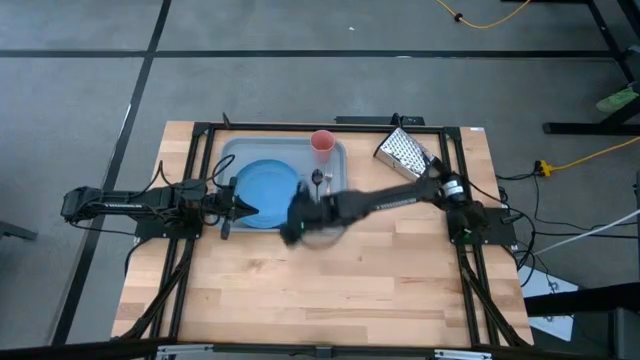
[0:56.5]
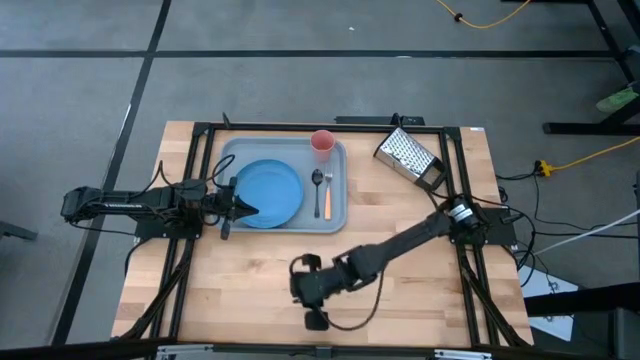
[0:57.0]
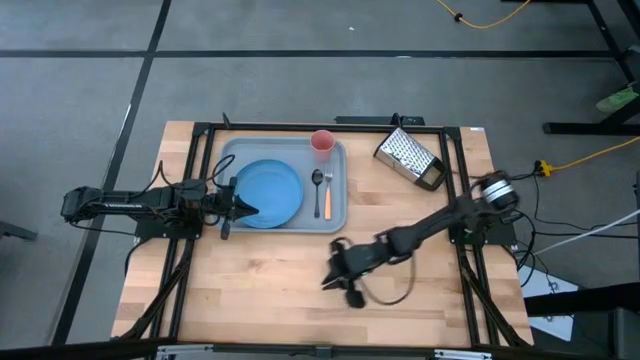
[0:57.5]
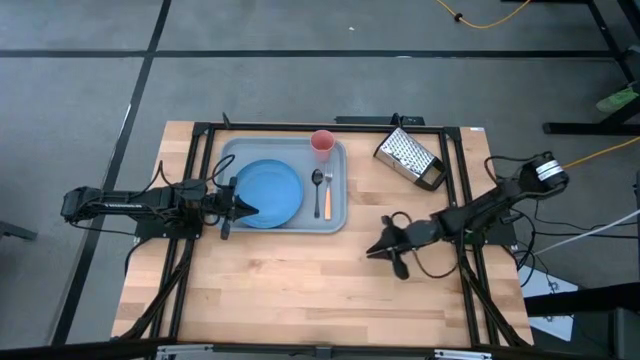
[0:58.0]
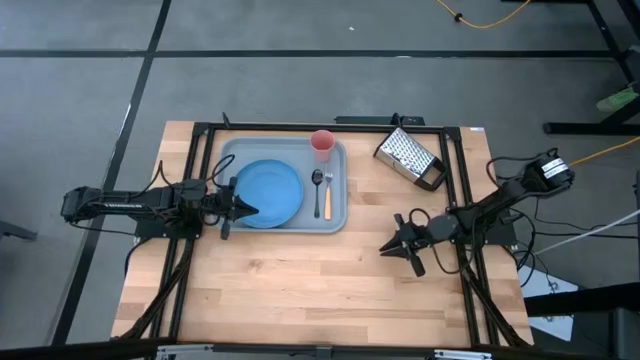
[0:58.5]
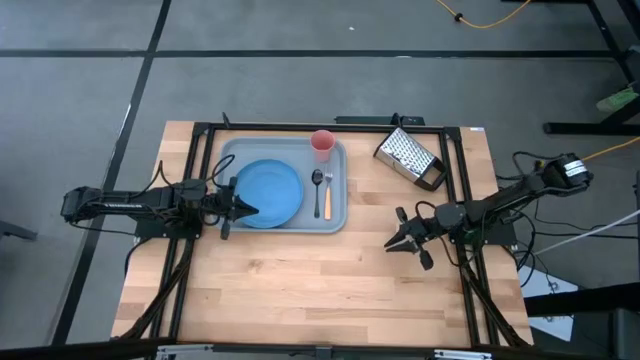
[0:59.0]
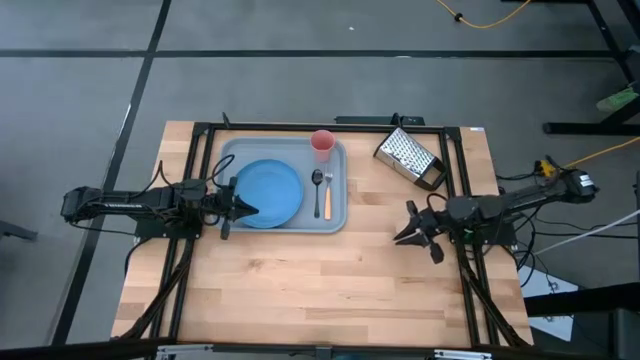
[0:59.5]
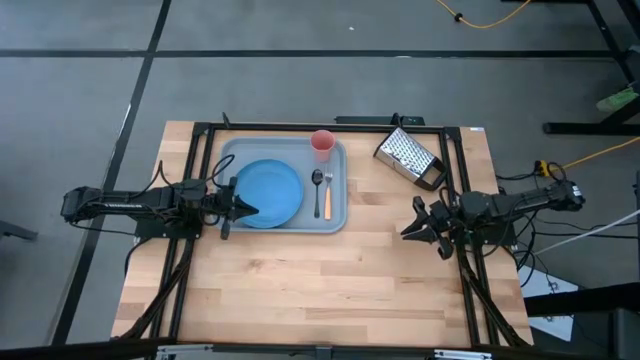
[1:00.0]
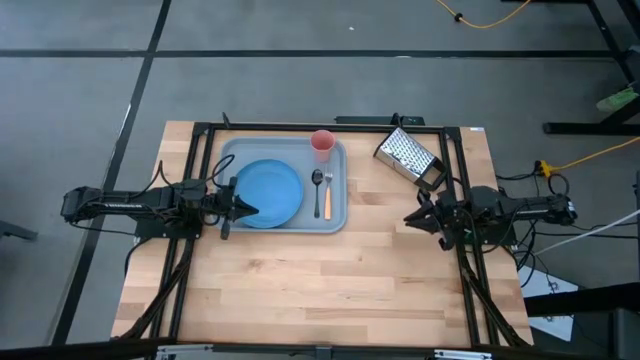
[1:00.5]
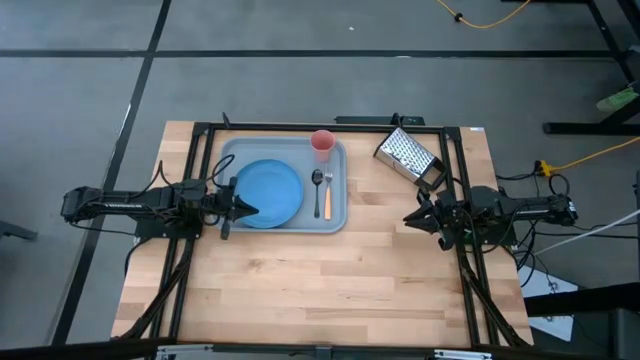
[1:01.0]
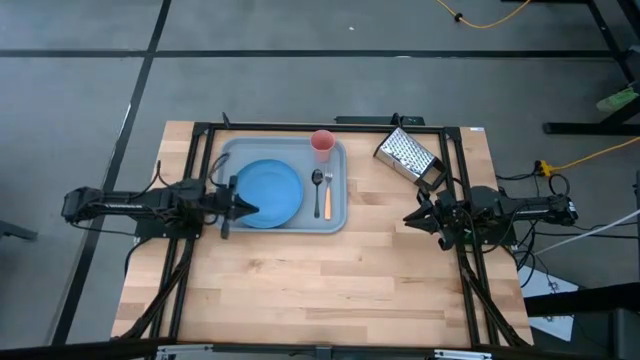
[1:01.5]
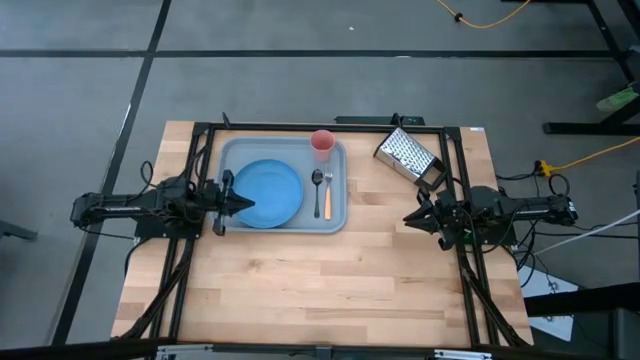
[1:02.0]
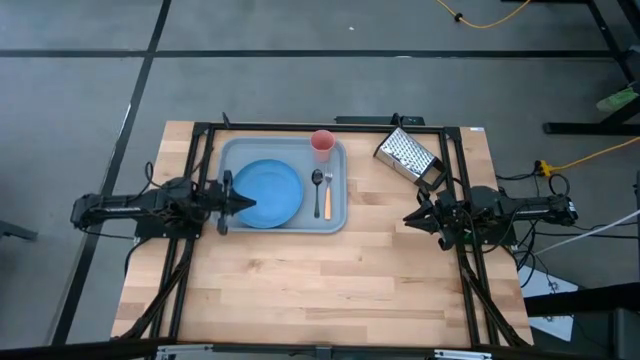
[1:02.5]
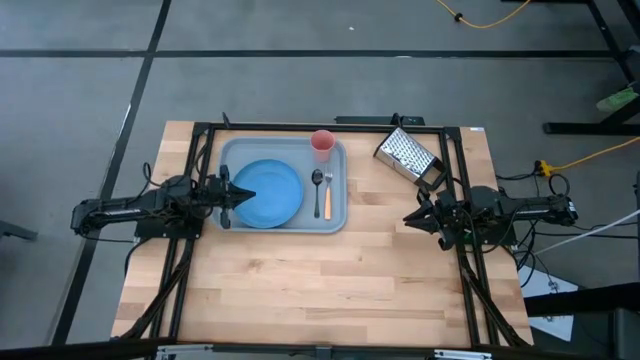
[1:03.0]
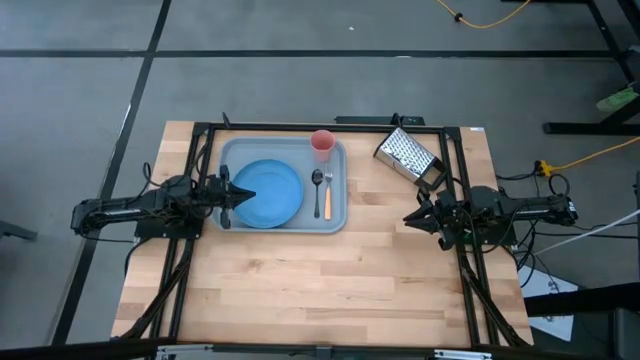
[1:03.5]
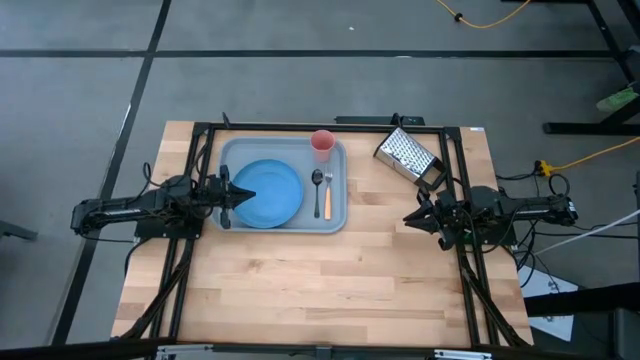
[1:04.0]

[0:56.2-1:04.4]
Task: Pick and place plate/cup/fork/spoon on tray
Return to Home Position

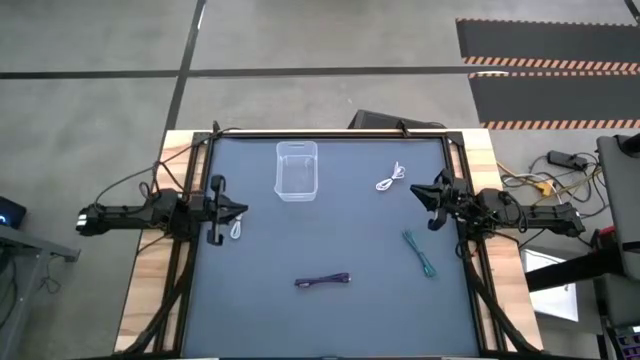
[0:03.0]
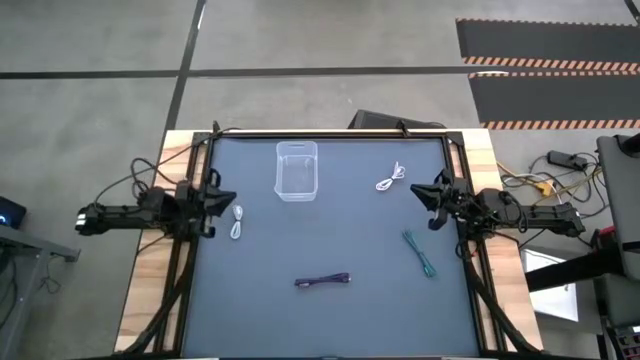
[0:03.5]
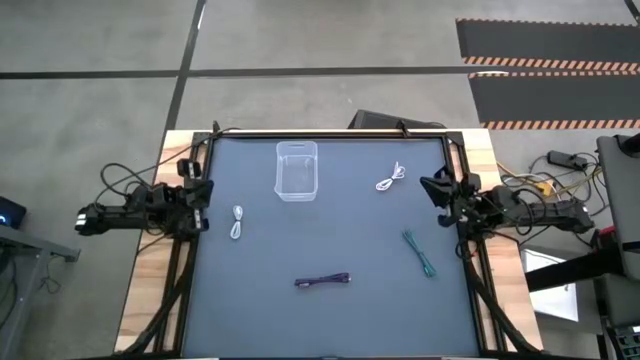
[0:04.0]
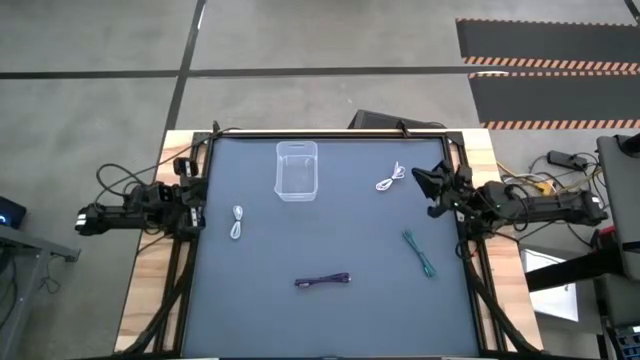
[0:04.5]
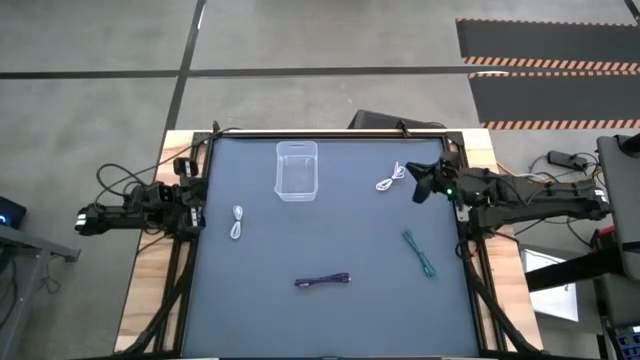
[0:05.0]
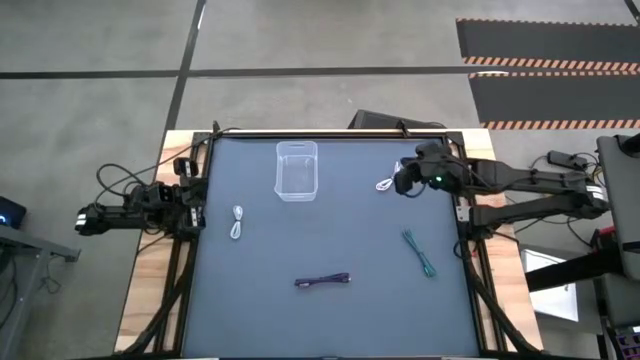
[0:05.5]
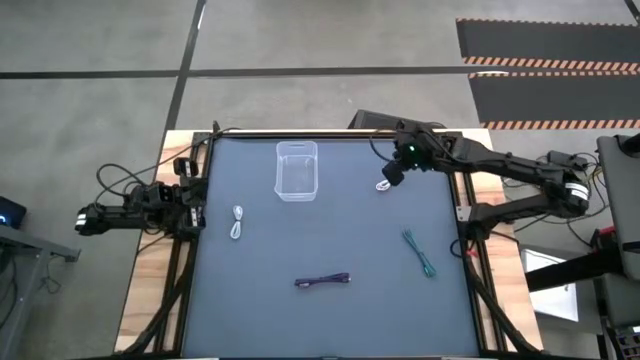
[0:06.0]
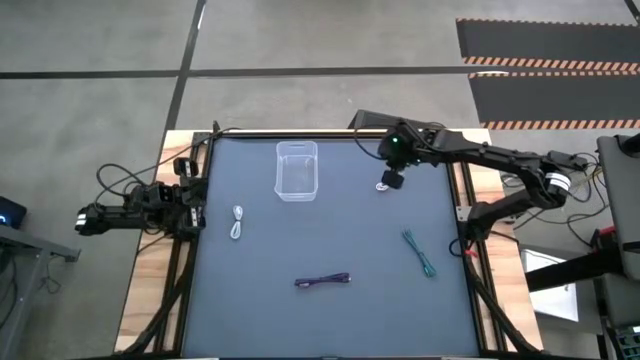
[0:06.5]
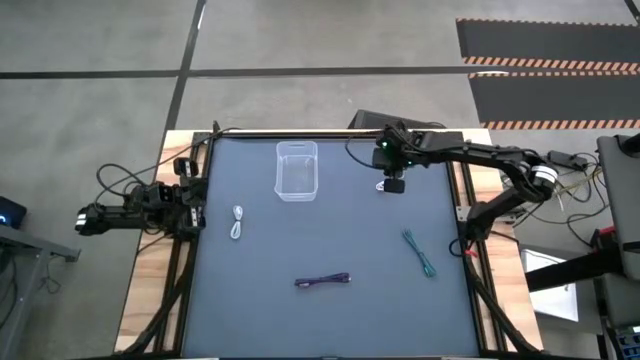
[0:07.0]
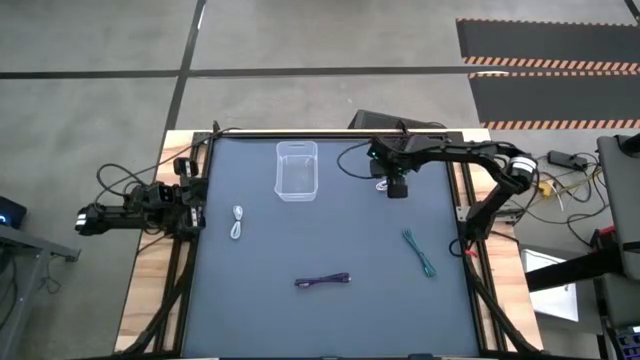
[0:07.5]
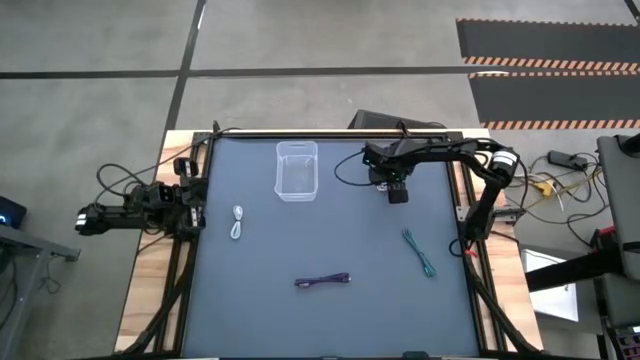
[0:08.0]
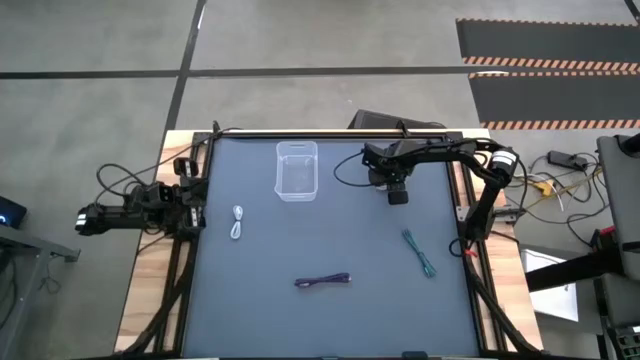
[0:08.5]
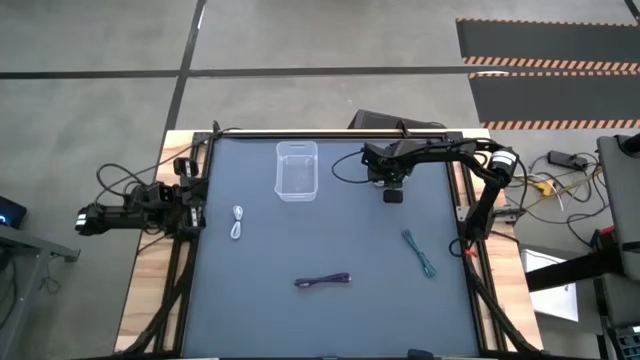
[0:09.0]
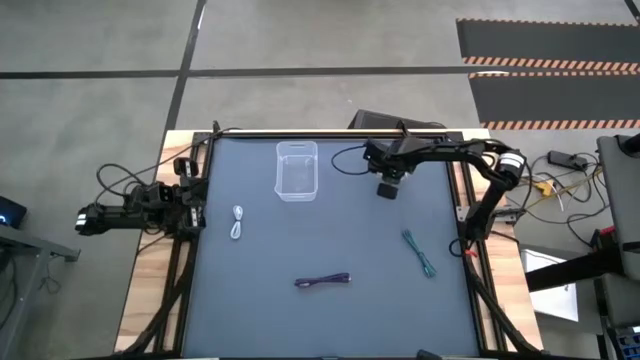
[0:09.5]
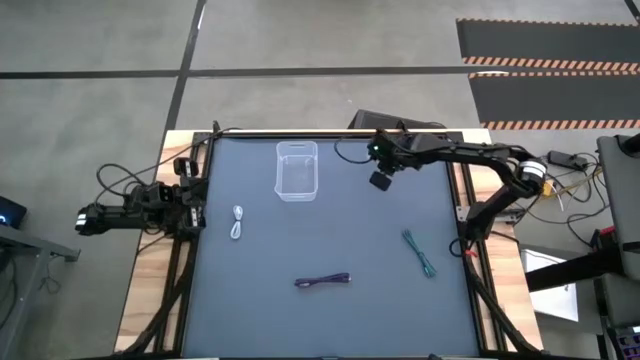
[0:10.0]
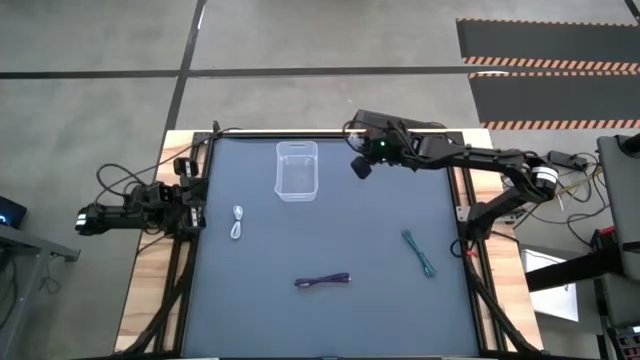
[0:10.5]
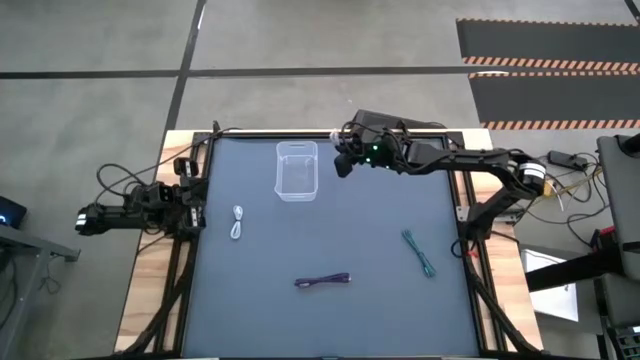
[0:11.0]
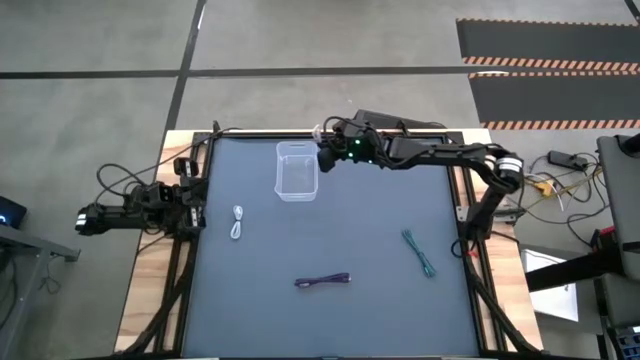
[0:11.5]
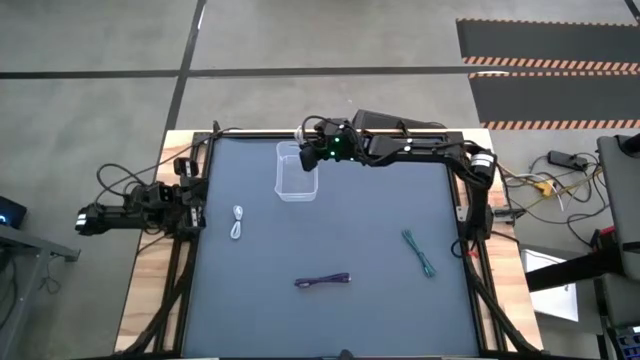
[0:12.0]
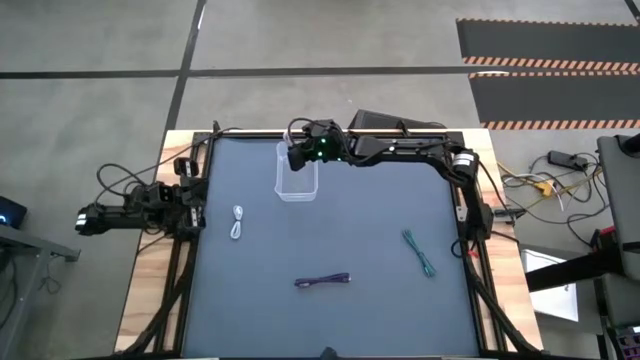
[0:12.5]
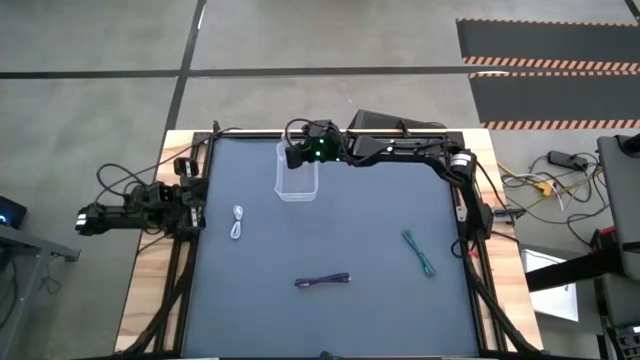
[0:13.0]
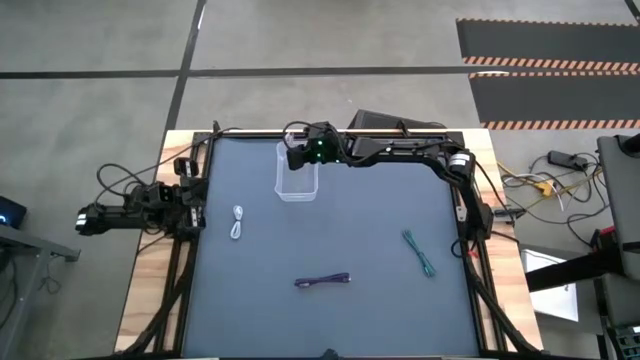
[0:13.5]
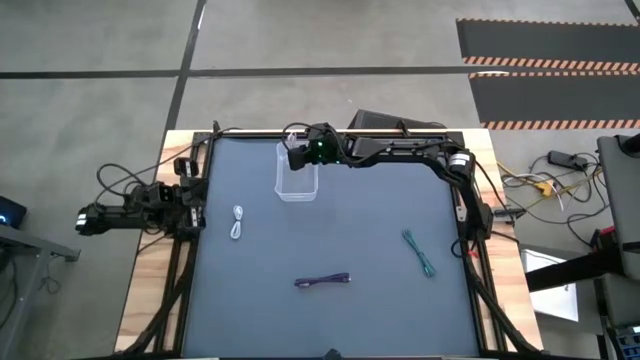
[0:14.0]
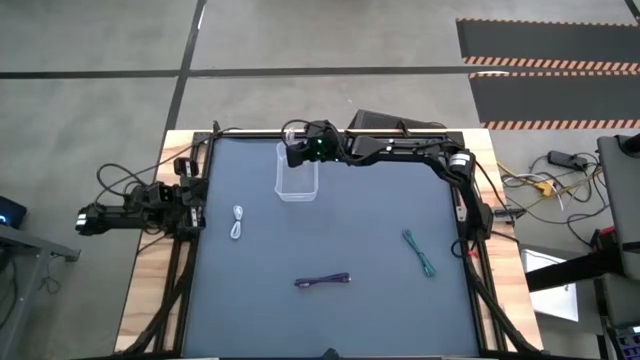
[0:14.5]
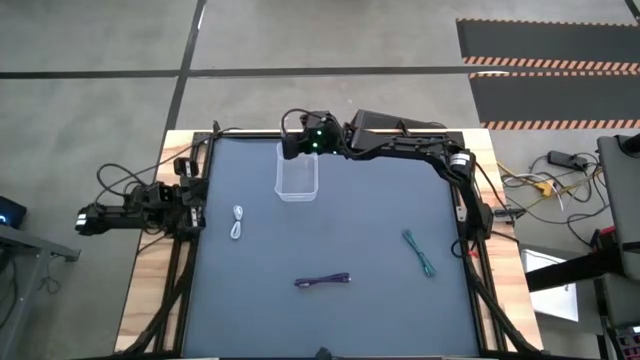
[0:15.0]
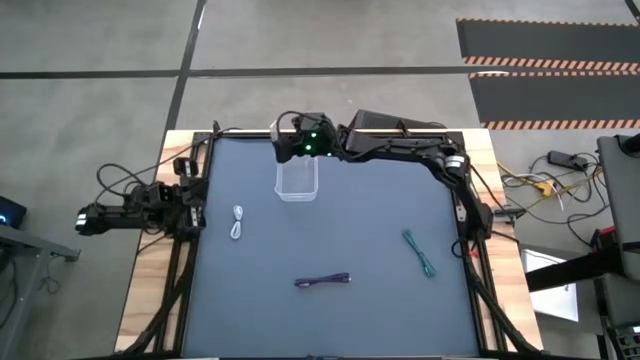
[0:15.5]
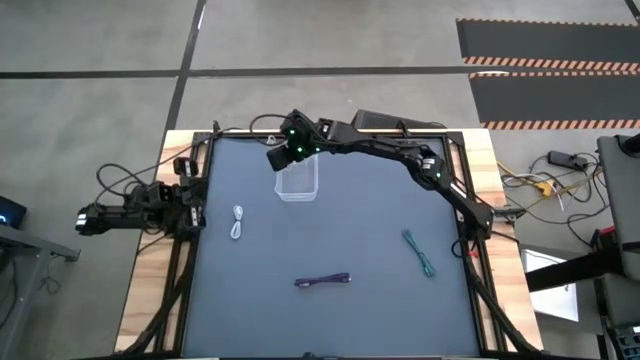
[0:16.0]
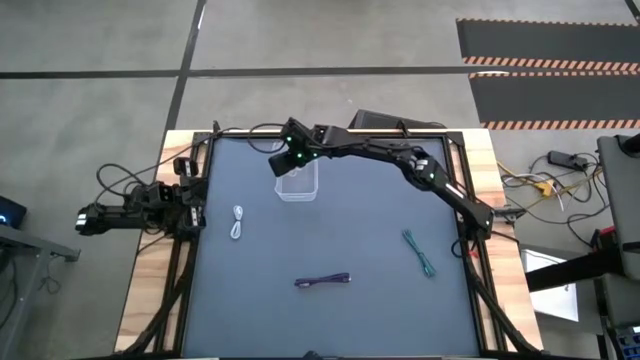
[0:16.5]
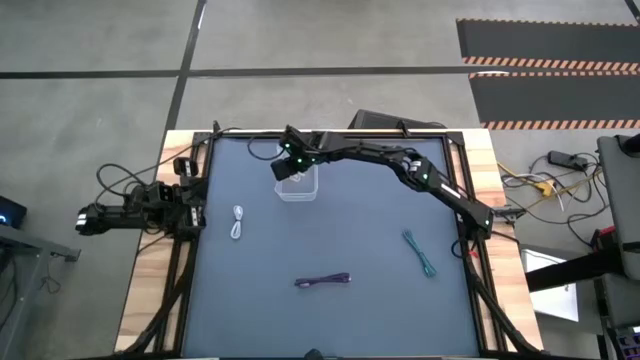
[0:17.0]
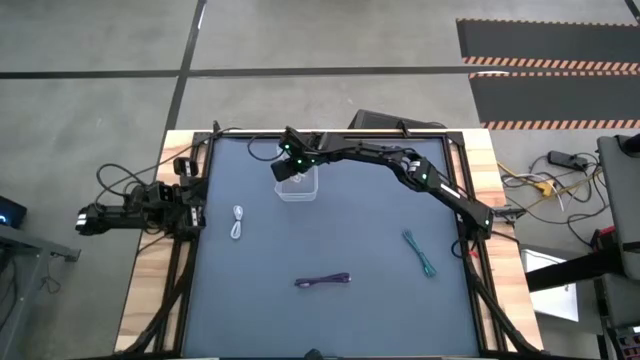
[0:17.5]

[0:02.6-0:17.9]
Task: Pick and place USB-C Cables
Put the right white charger cable into the transparent bin
